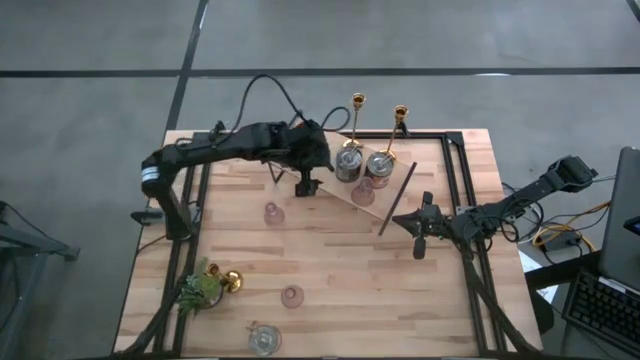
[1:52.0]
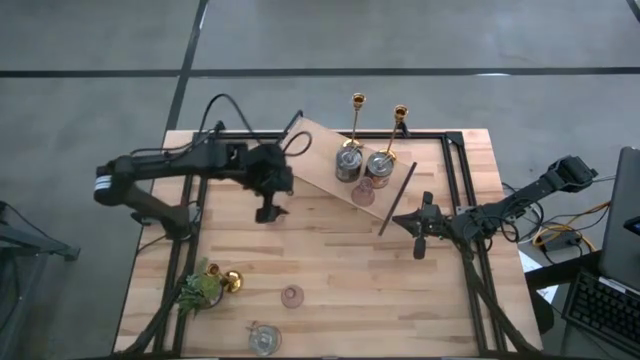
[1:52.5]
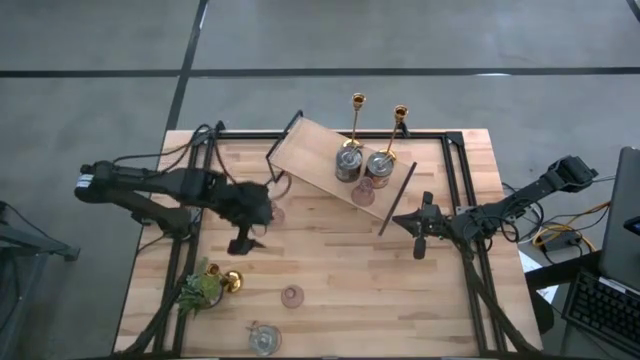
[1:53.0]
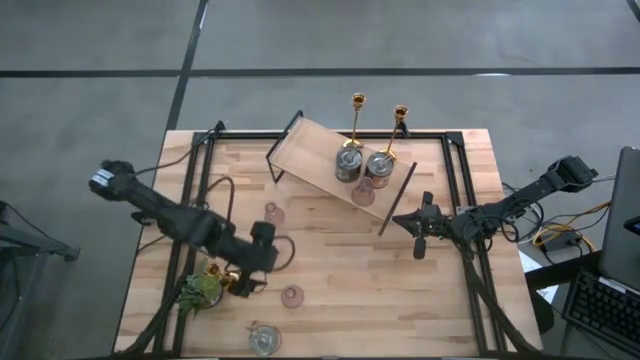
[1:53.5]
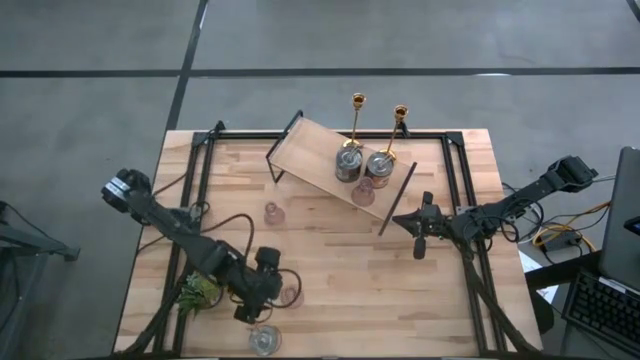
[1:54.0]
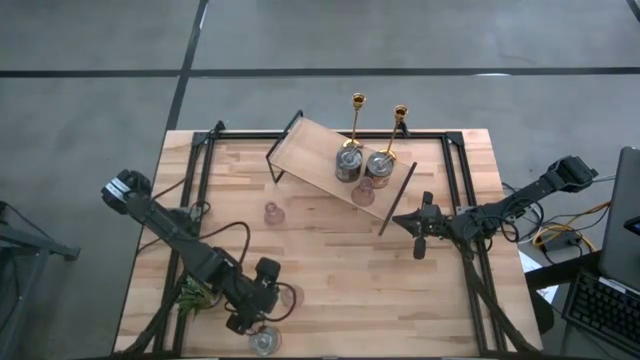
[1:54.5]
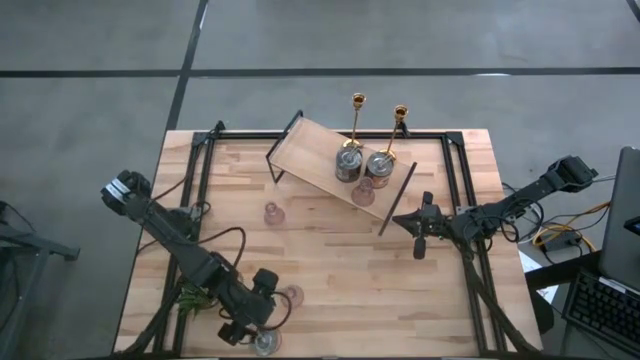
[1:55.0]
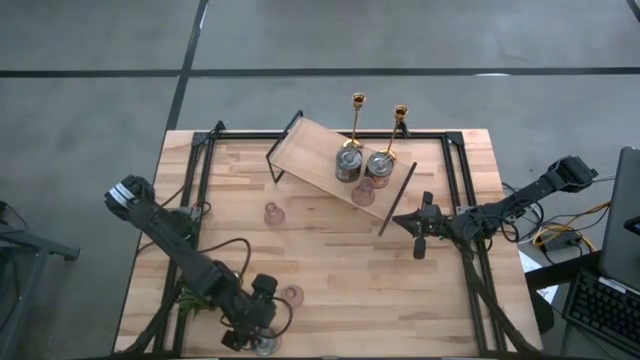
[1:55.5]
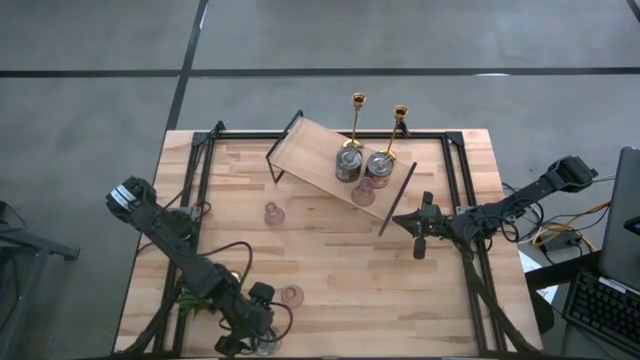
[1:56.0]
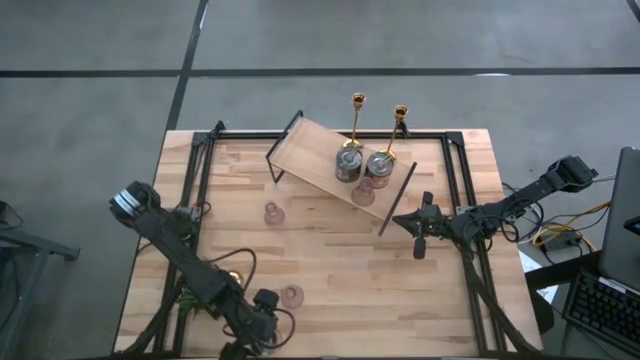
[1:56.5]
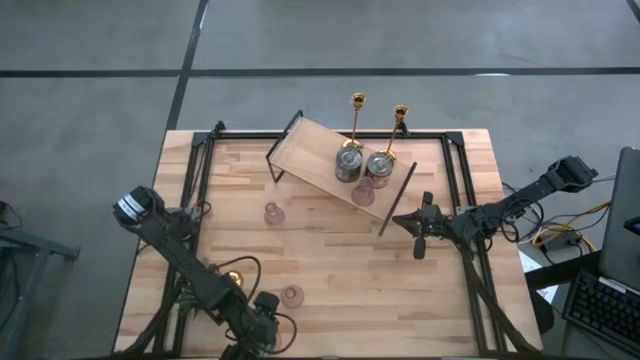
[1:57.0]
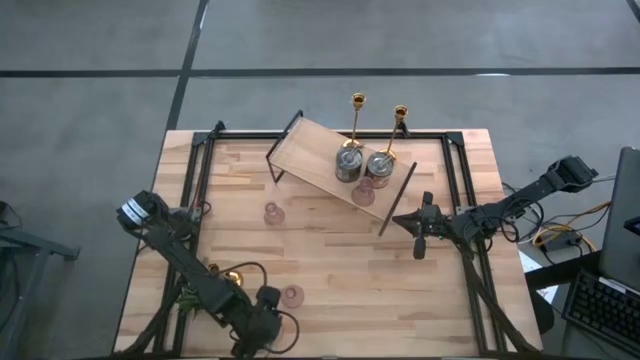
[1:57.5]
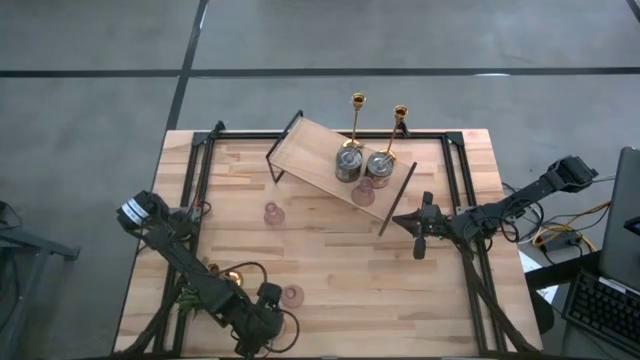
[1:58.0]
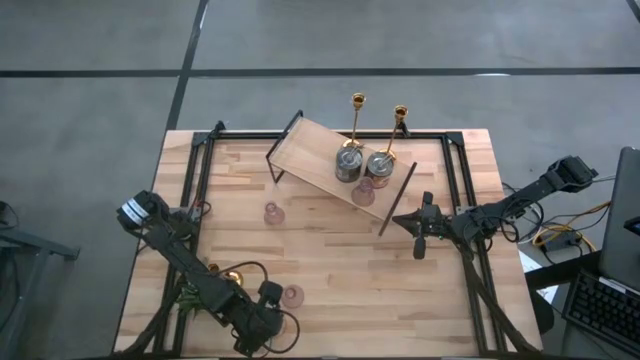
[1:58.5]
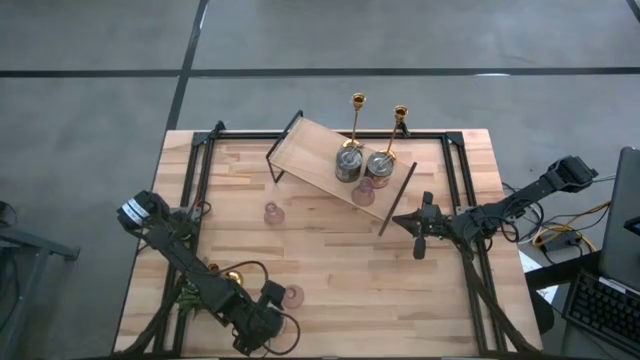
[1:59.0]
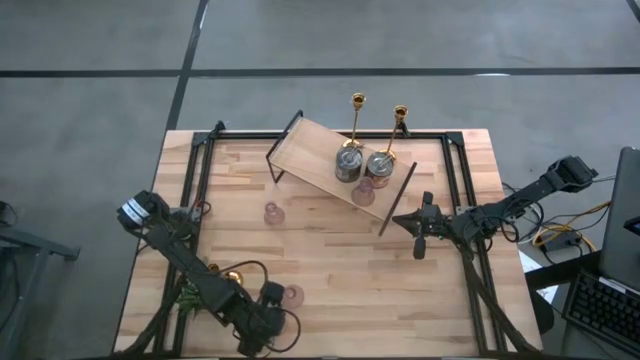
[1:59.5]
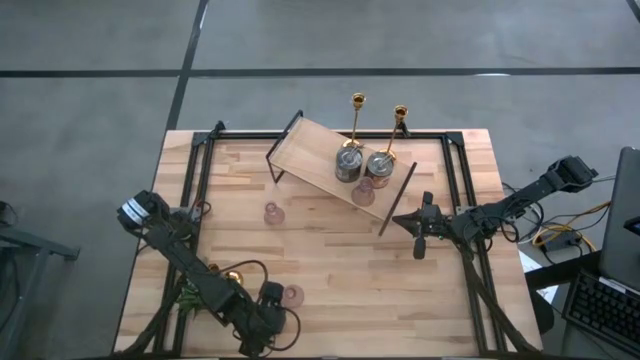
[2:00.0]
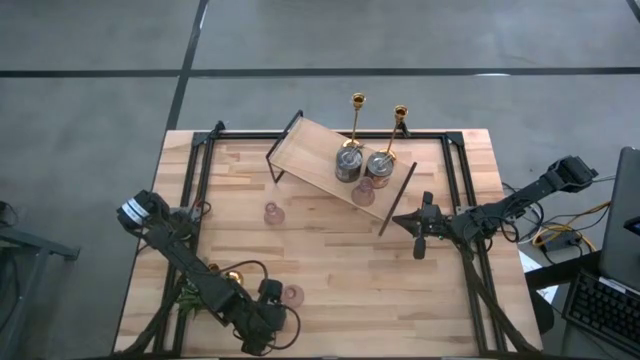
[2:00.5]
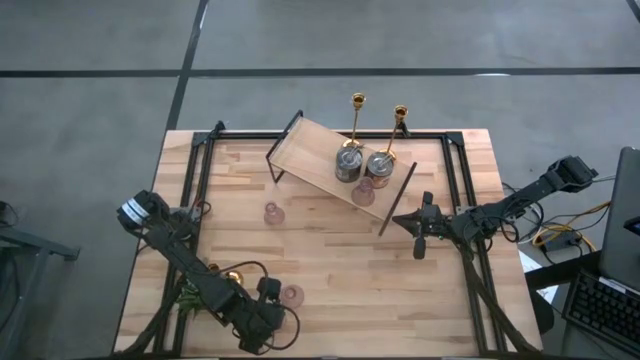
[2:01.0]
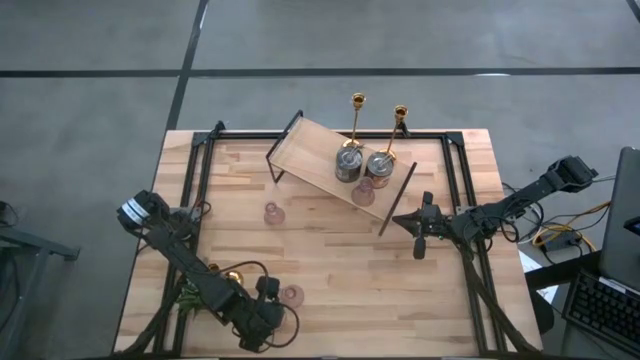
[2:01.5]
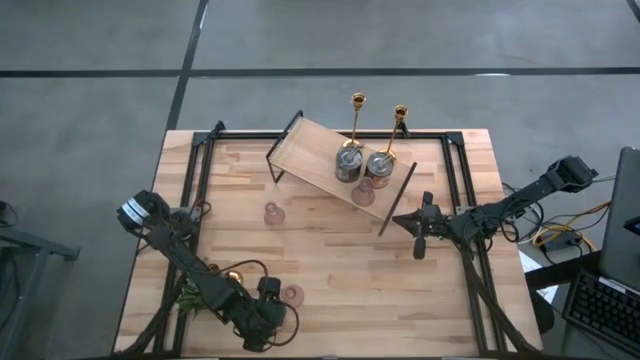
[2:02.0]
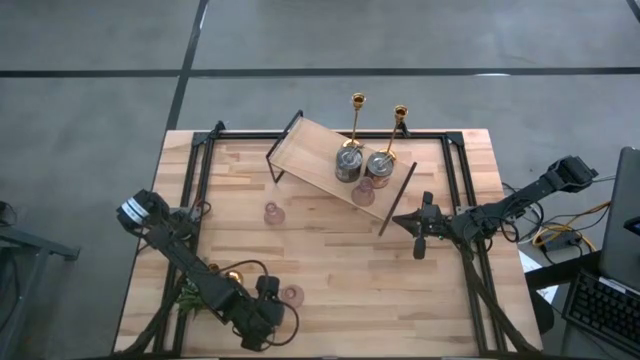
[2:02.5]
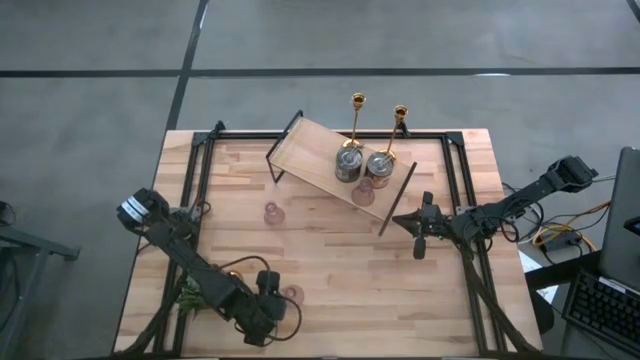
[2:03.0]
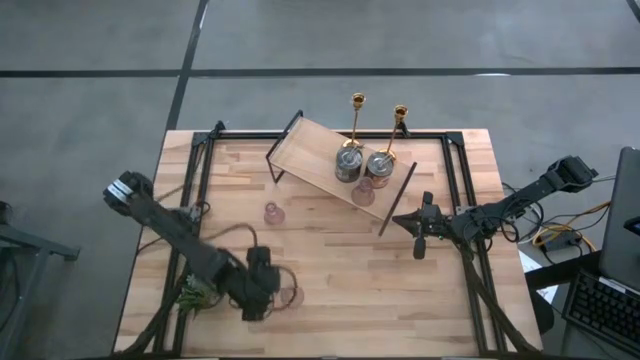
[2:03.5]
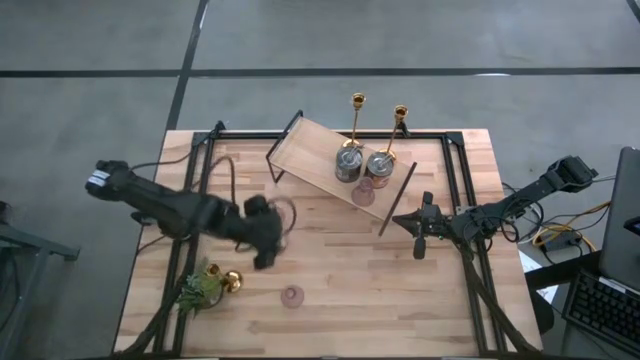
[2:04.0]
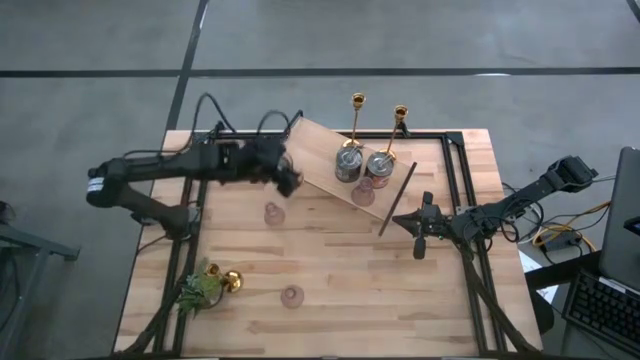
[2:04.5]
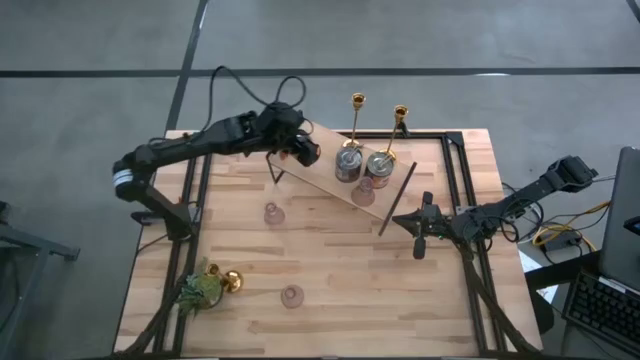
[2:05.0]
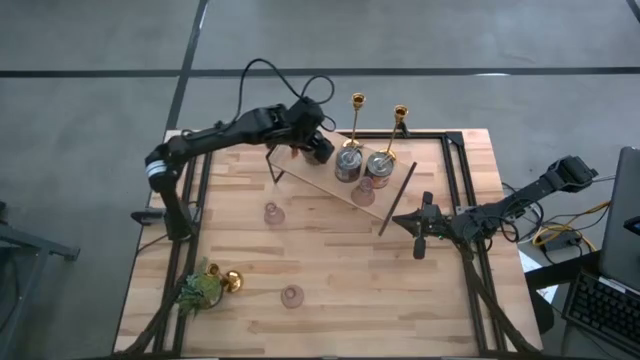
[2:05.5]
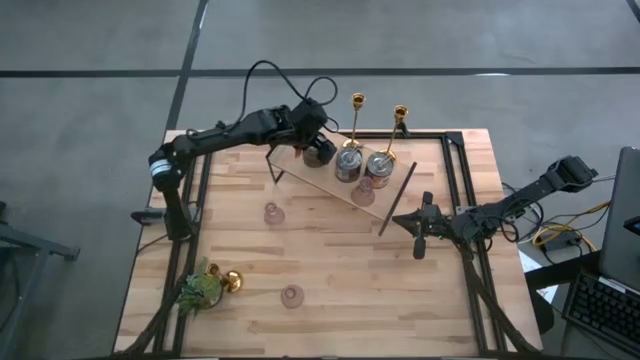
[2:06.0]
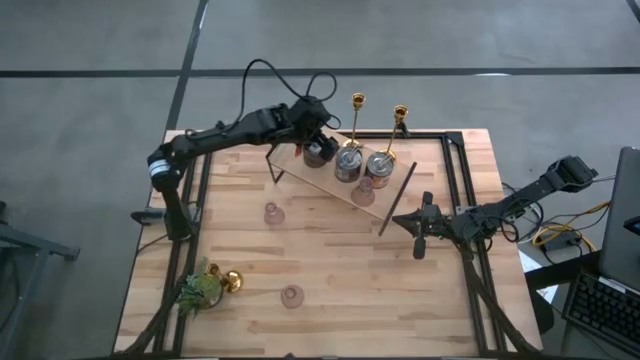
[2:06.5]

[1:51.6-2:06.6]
Task: Pick & Place candle stick holders
Put the silver scented candle on the shelf aligned with the other silver scented candles

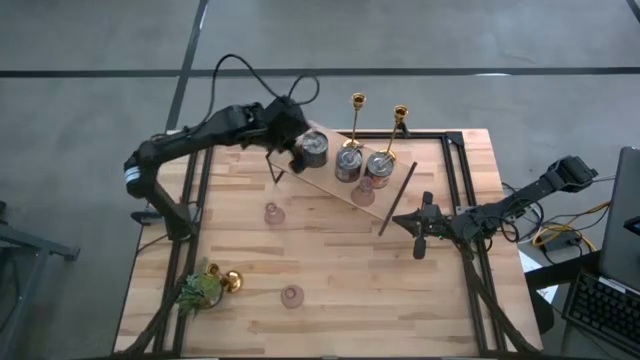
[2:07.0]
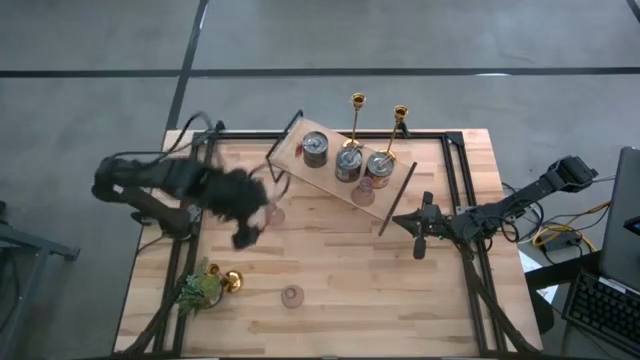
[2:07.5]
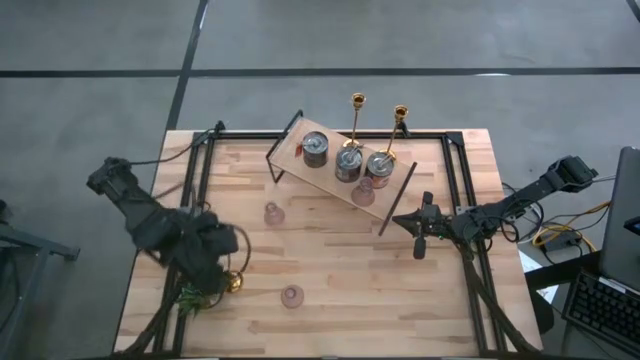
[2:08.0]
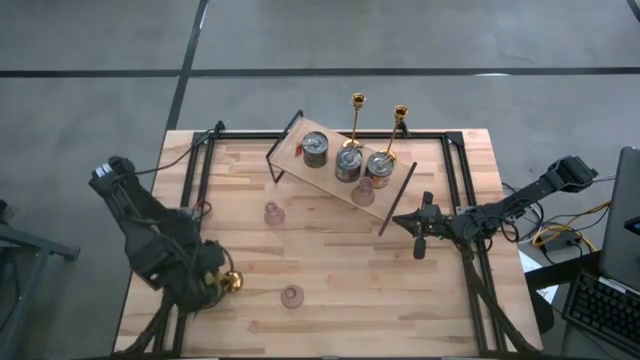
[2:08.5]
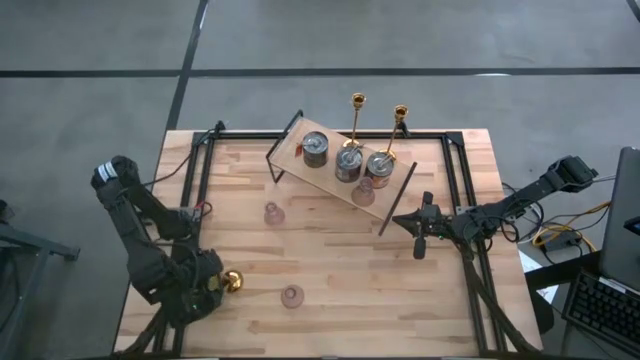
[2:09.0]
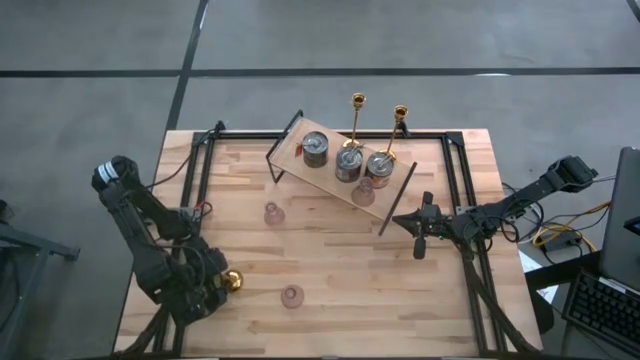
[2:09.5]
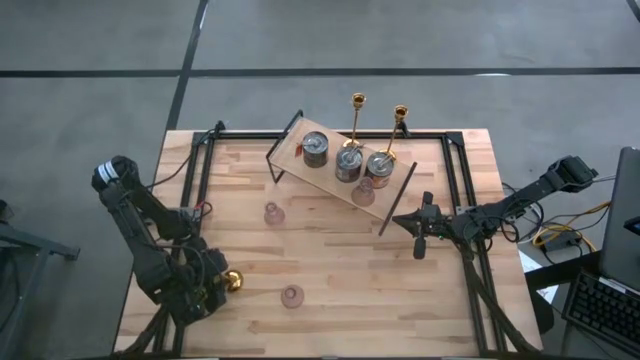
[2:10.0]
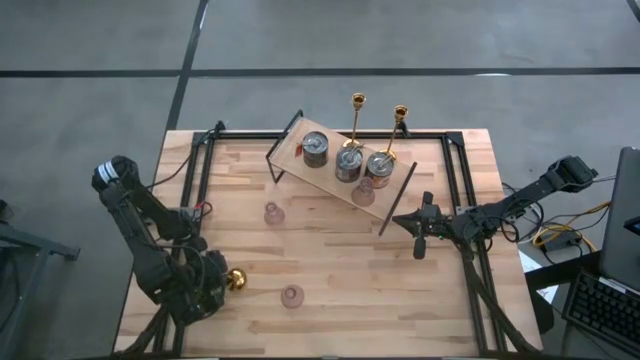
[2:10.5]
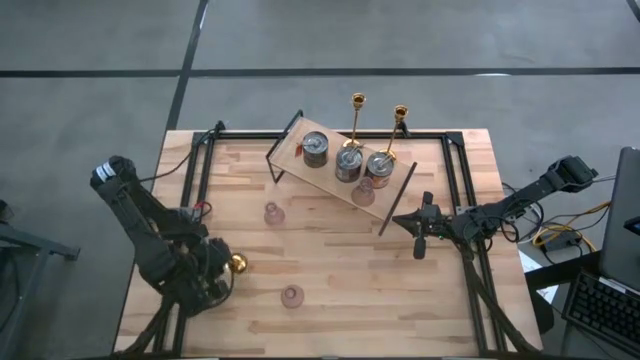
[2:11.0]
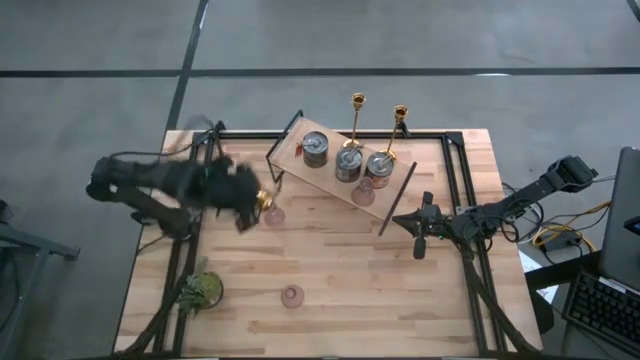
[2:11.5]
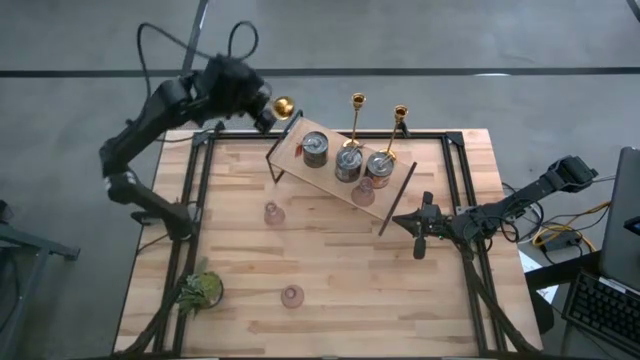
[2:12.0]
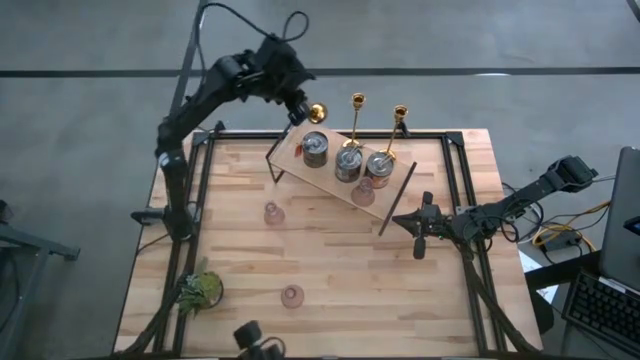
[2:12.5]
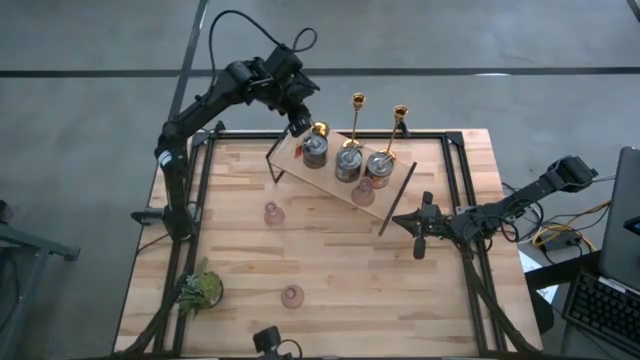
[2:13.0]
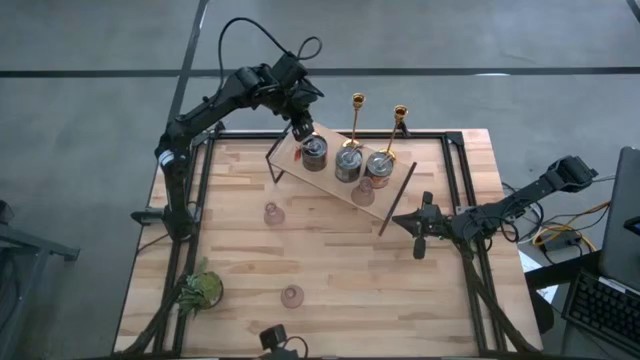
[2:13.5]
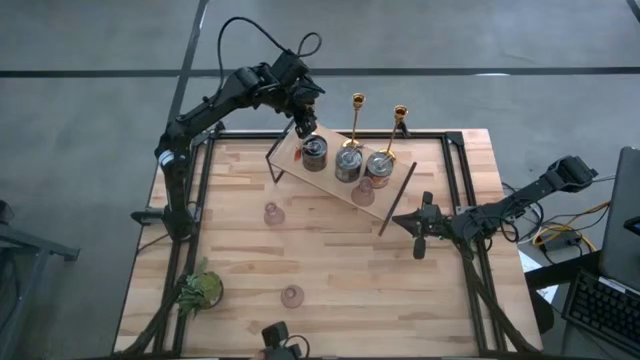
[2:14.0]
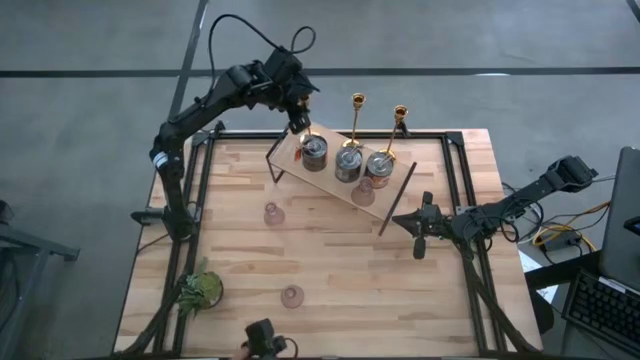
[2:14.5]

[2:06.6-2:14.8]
Put the gold candle holder on the shelf aligned with the other gold candle holders
